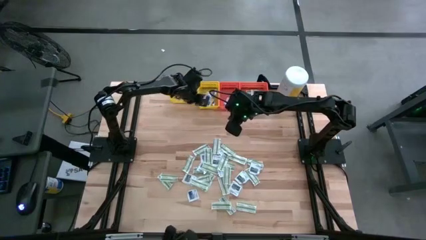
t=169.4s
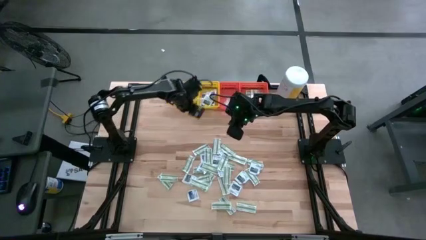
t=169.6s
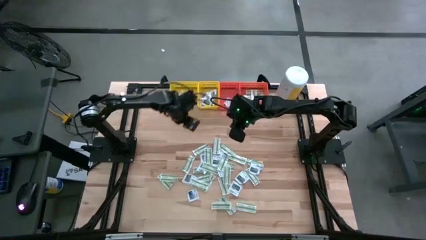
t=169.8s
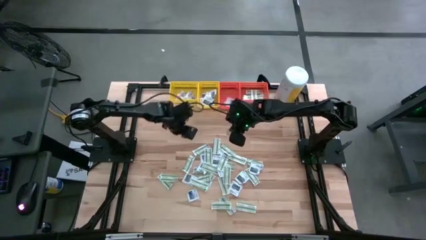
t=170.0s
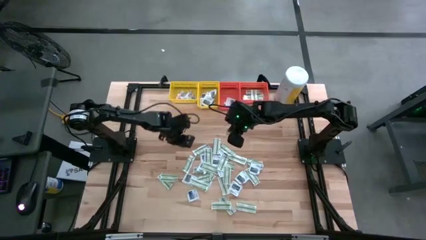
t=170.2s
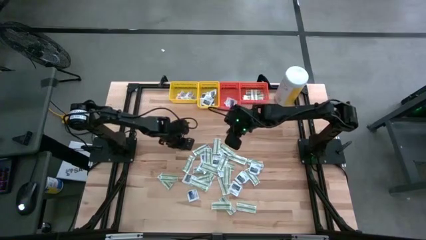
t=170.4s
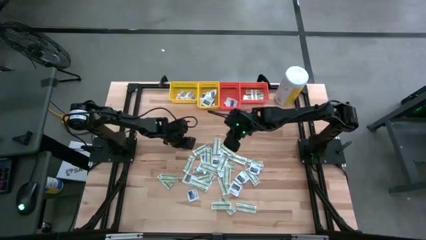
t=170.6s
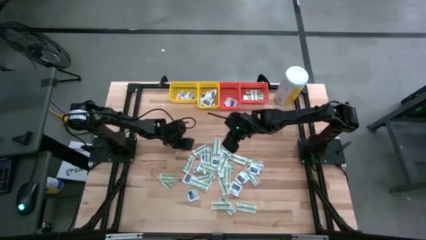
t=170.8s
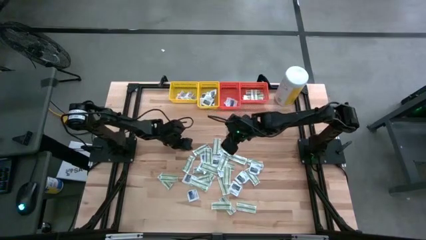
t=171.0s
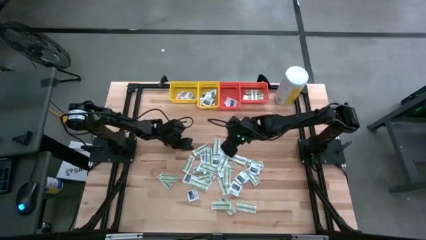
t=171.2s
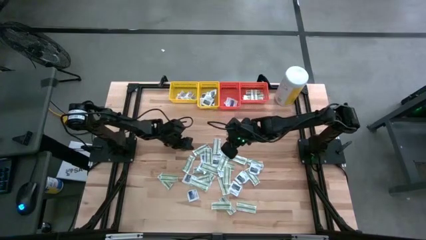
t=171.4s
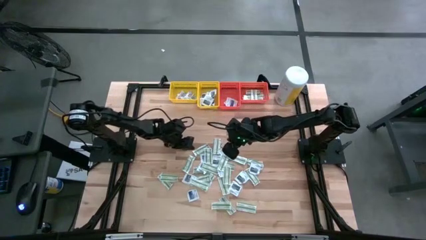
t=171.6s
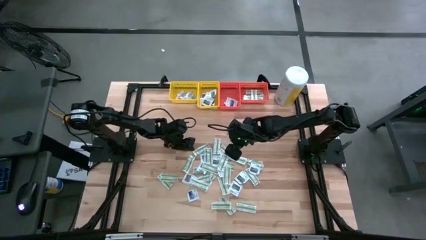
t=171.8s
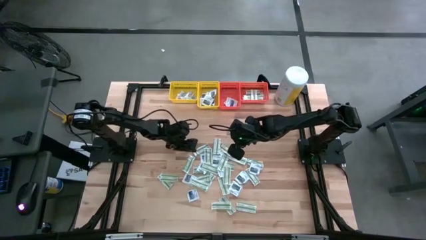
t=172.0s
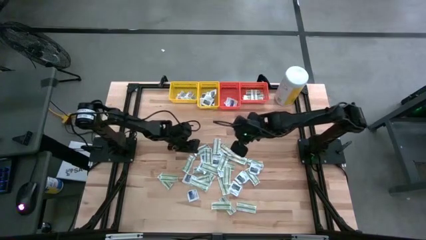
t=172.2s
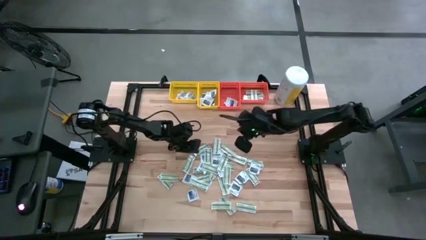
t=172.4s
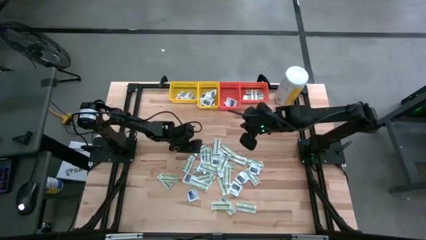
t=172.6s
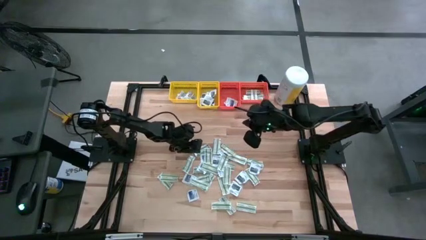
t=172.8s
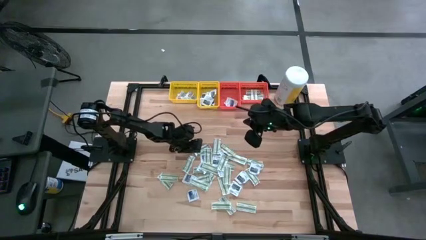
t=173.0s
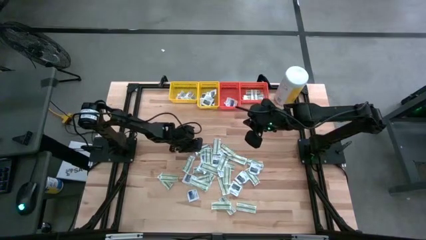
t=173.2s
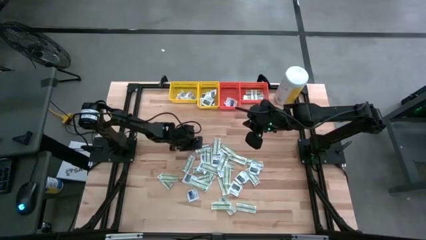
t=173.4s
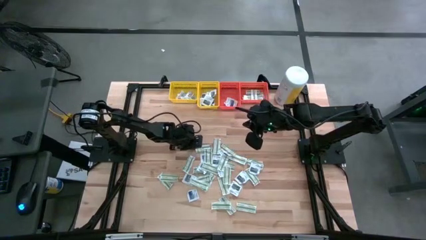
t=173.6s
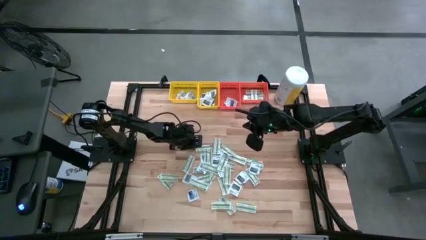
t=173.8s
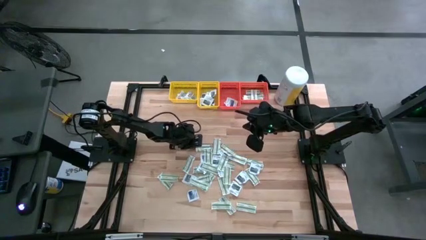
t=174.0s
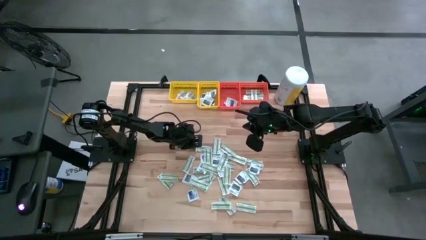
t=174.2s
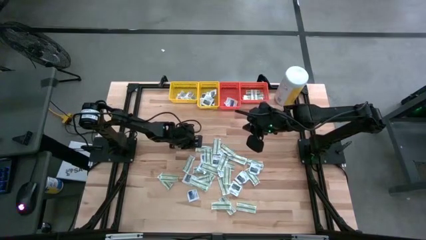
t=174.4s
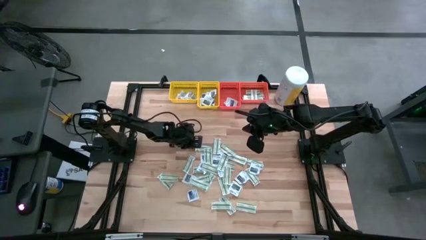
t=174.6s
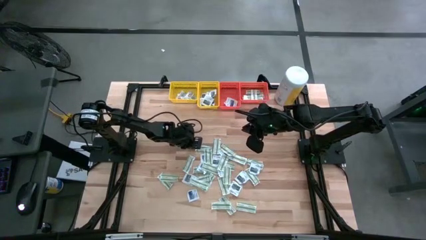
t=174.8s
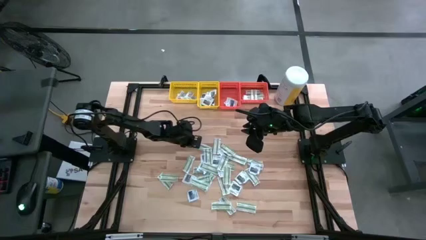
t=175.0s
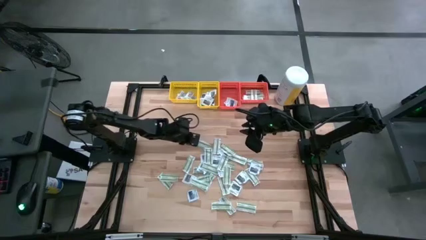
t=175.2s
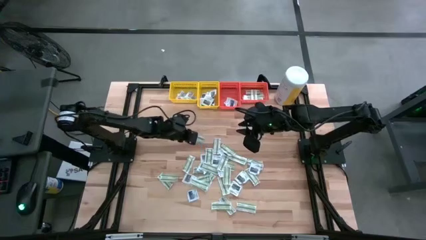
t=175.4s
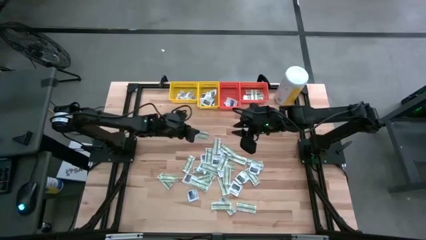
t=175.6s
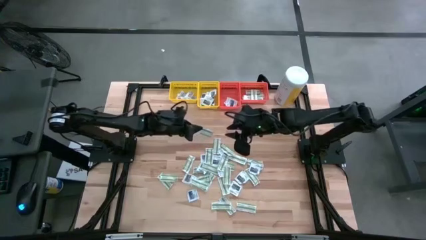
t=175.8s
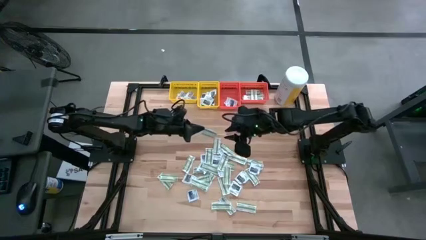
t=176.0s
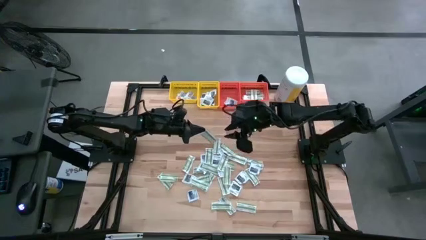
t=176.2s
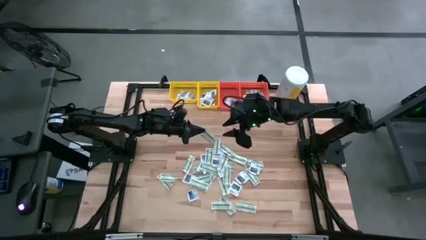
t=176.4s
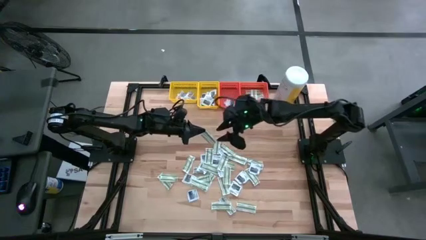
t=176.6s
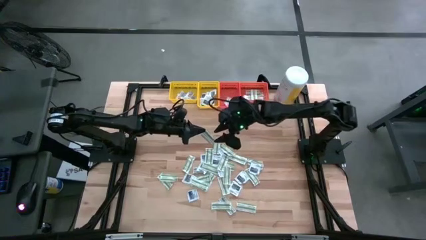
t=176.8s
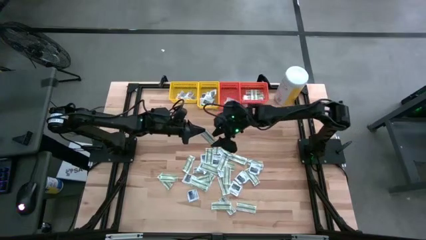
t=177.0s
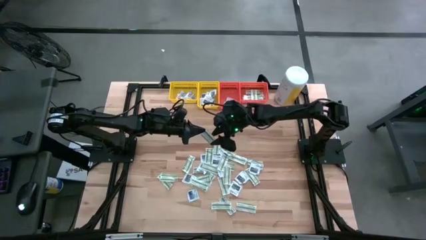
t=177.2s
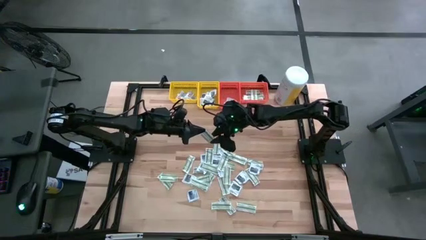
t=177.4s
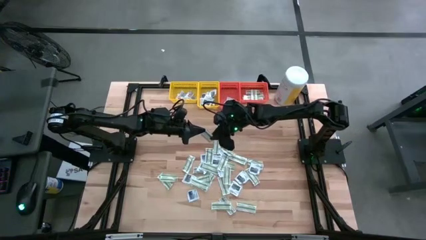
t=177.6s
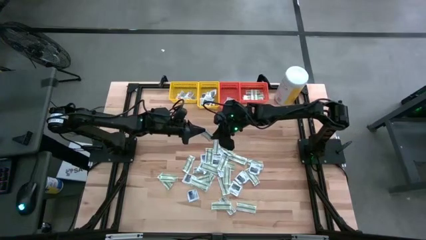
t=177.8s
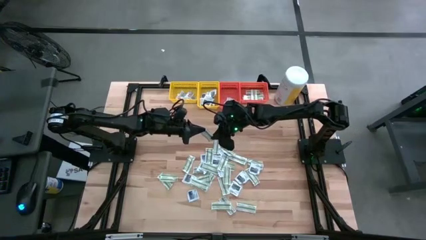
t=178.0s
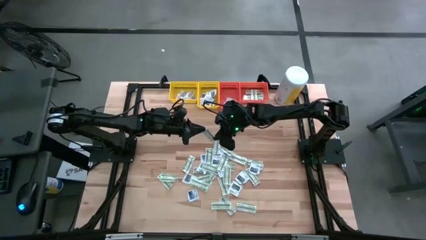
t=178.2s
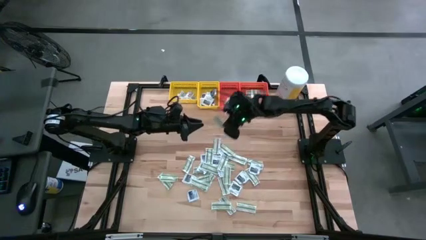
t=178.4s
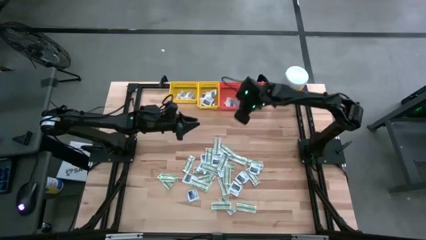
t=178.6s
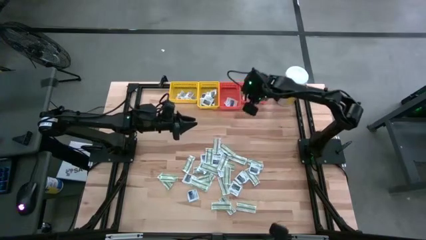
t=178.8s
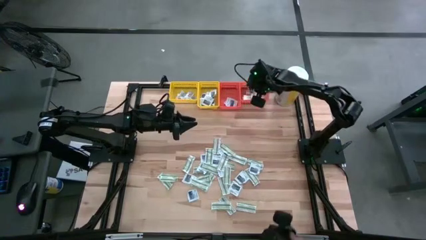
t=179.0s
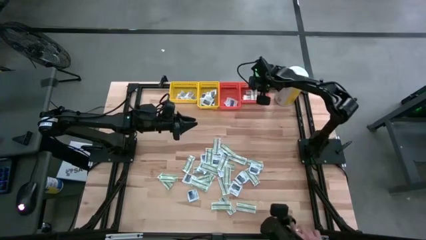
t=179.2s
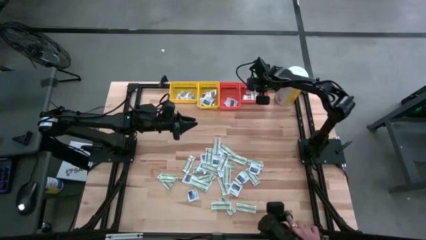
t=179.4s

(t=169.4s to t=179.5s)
Task: Pick & Place First Aid Supplies
Put the green pad into the right orange bin

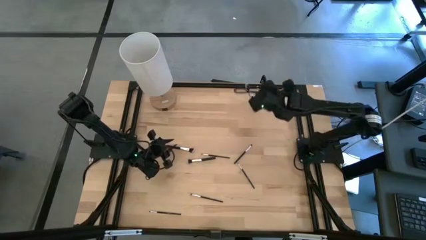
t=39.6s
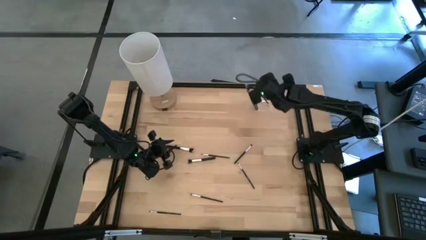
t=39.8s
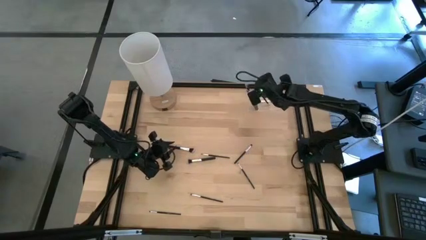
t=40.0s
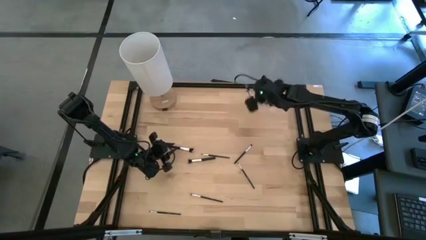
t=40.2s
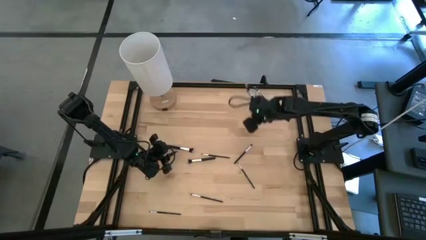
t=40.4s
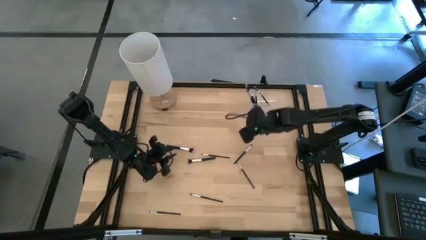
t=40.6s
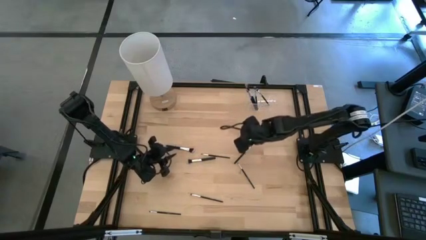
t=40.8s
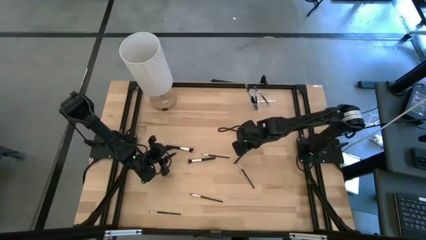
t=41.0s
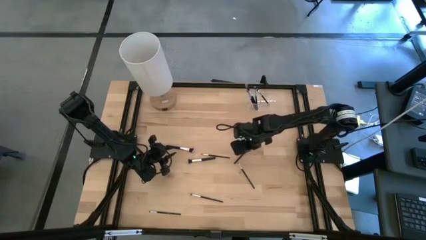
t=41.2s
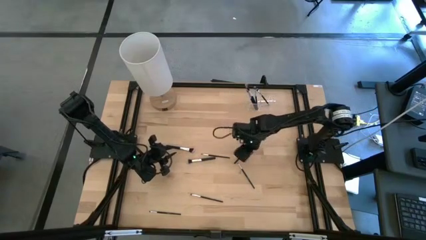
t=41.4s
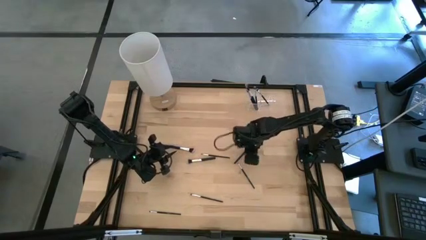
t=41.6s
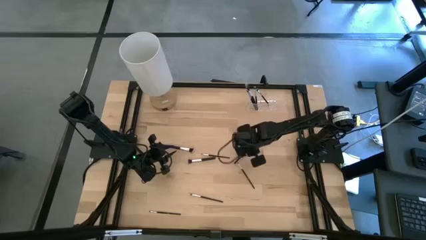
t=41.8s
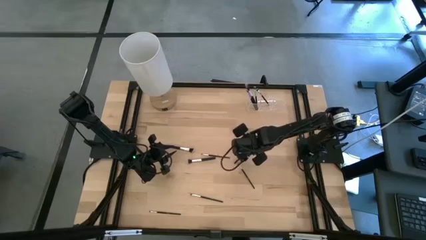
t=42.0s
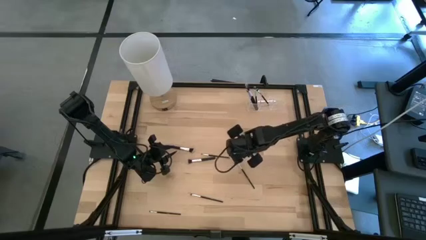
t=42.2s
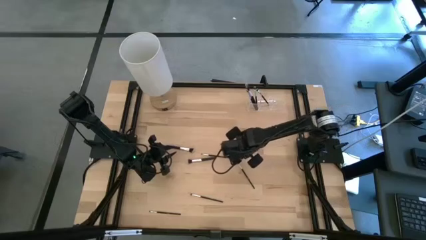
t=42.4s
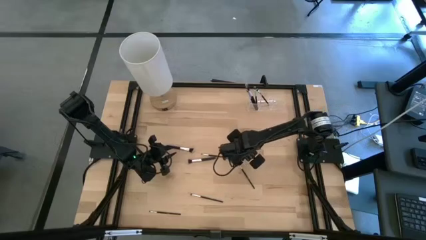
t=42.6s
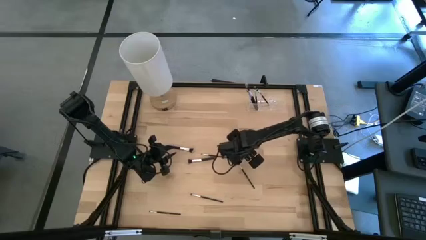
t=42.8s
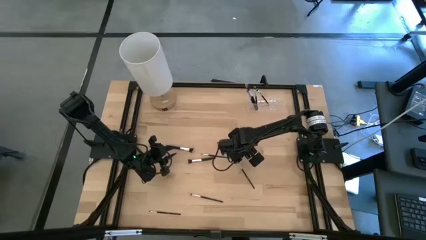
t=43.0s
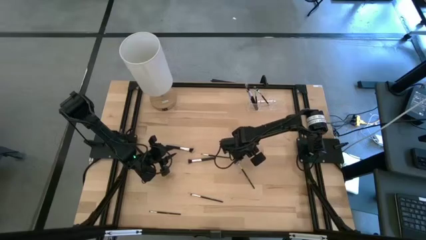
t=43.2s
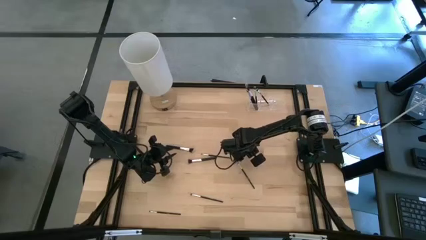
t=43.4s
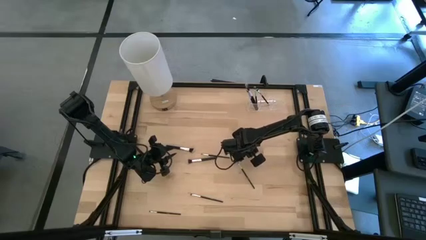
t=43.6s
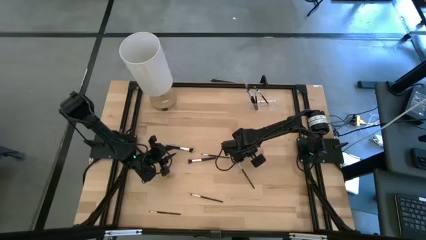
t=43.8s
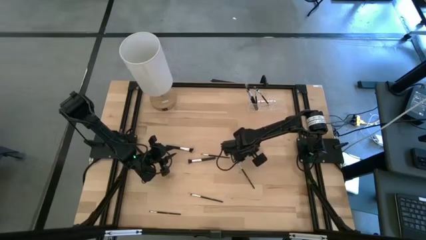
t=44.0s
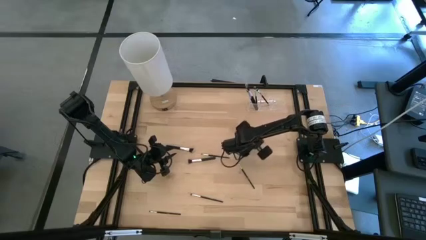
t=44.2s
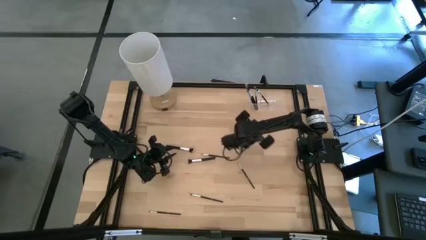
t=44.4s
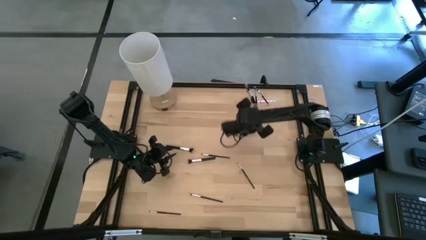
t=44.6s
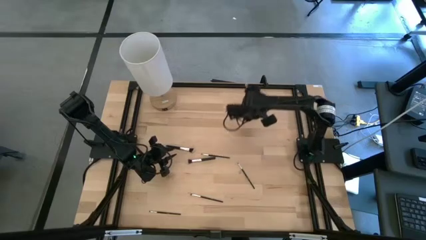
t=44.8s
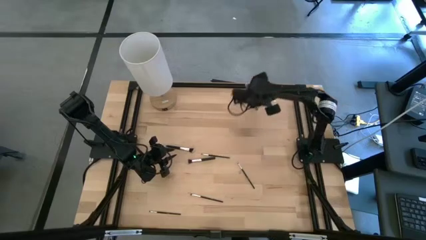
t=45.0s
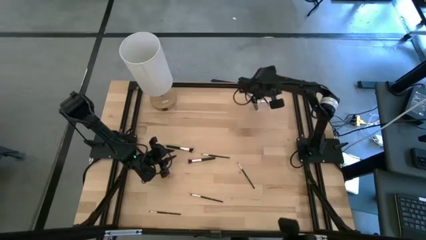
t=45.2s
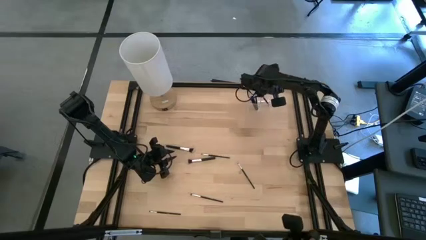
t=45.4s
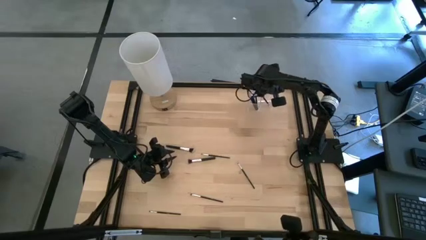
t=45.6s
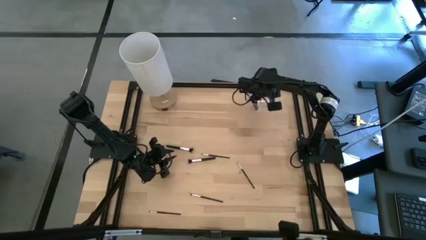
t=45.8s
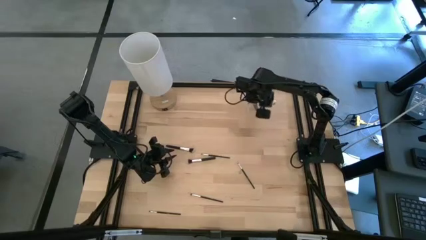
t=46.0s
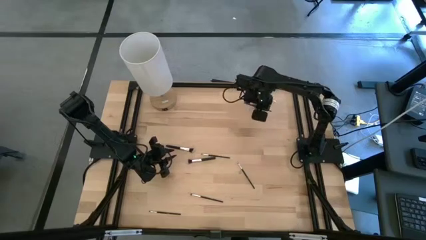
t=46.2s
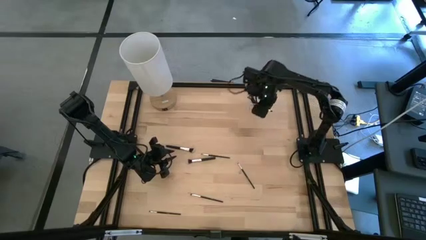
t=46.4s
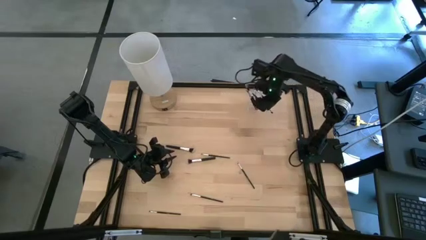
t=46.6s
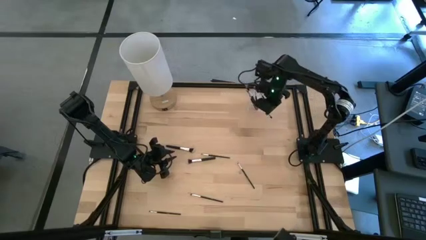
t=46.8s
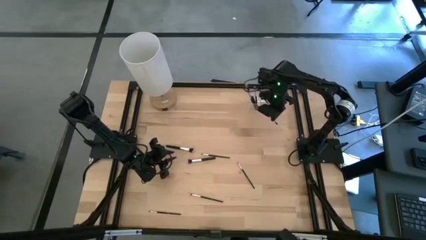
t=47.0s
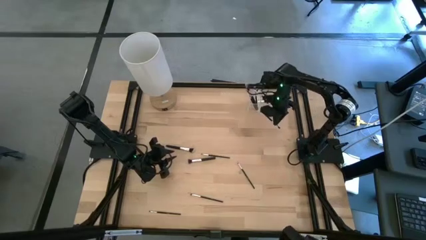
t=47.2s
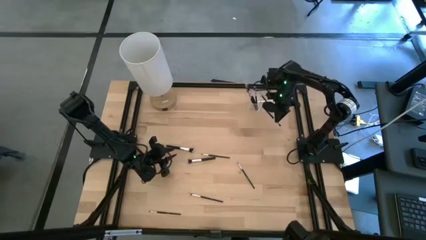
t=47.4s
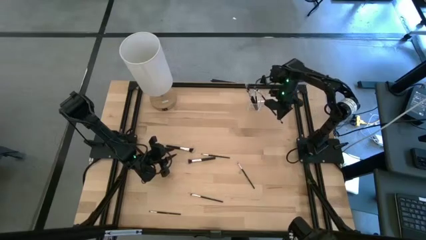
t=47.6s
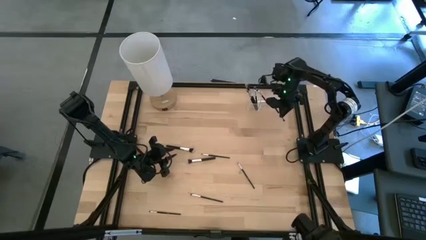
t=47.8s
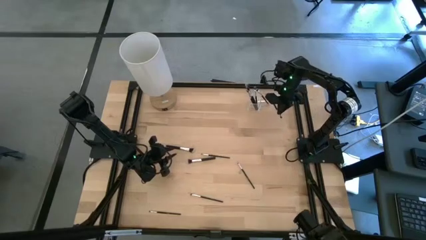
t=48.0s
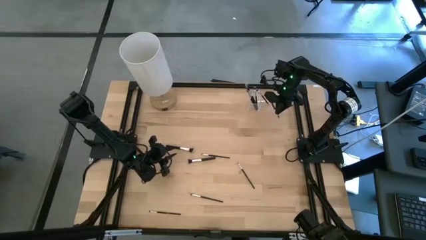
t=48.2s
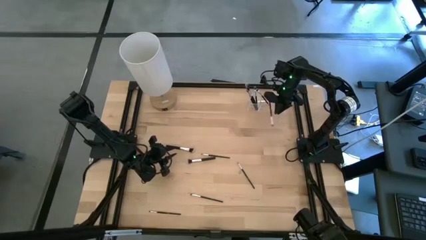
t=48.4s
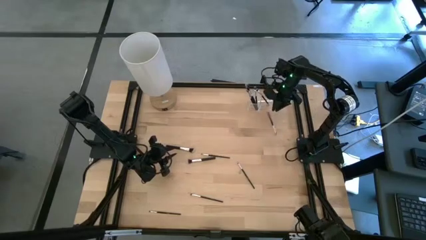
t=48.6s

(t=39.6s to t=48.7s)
Task: Put items in baskets/containers
Put the eyeshadow brush into the middle of the transparent organizer
